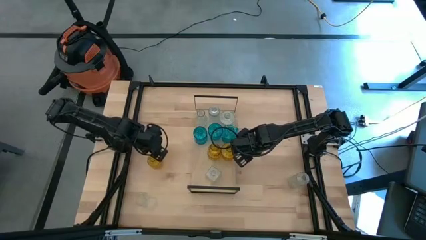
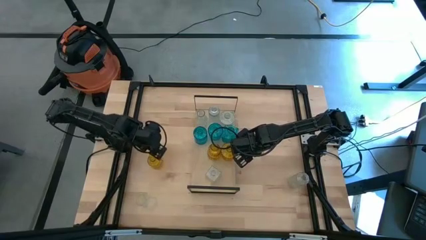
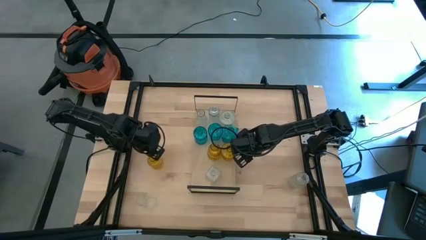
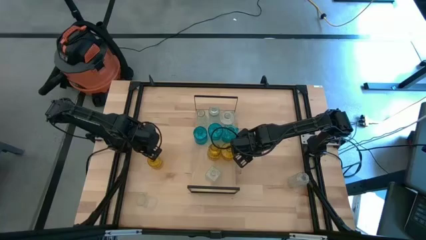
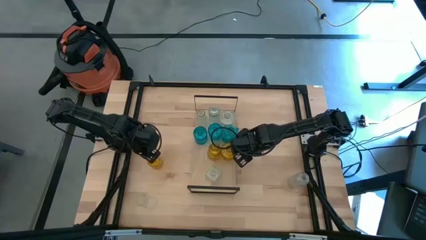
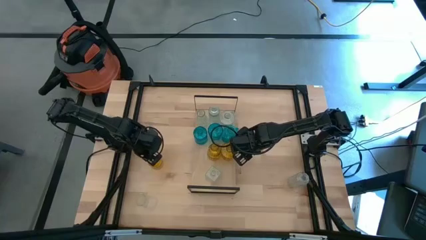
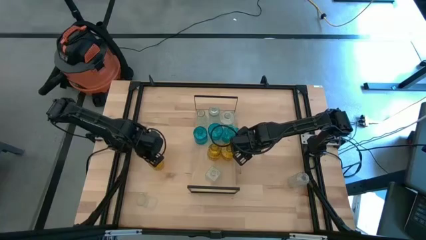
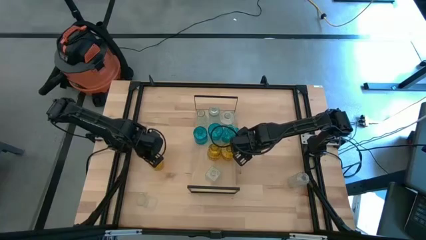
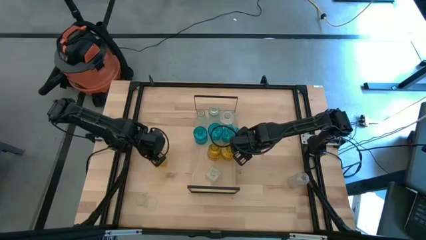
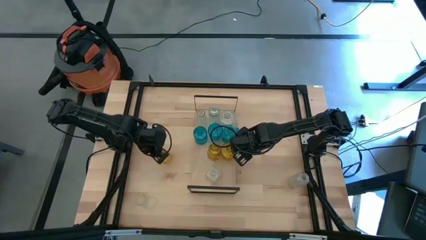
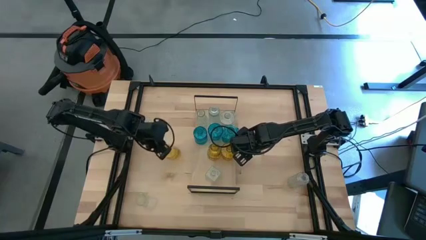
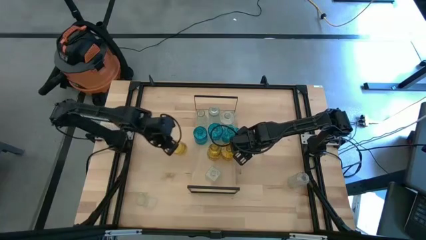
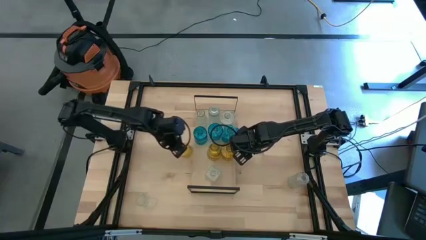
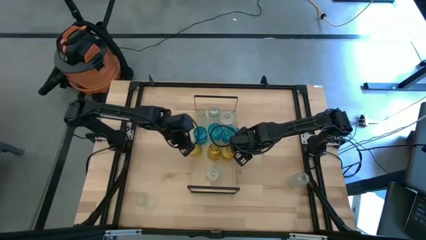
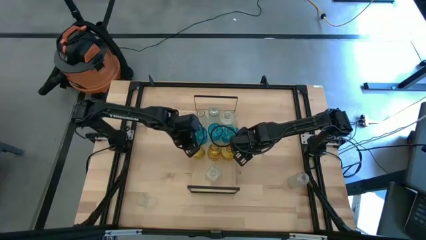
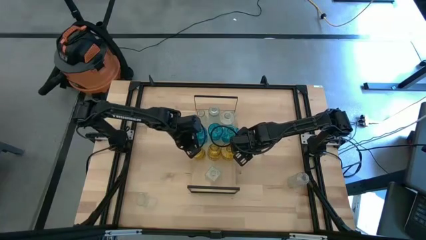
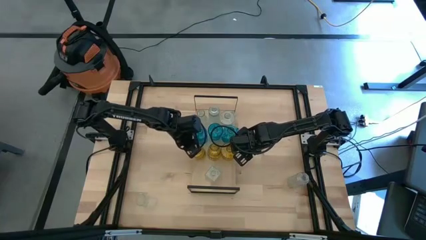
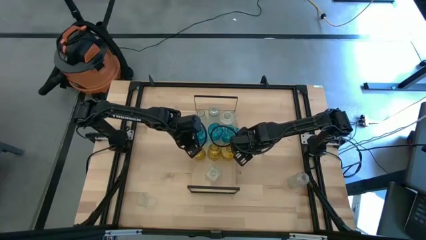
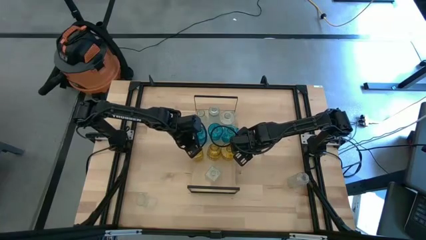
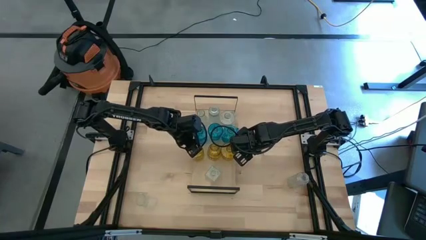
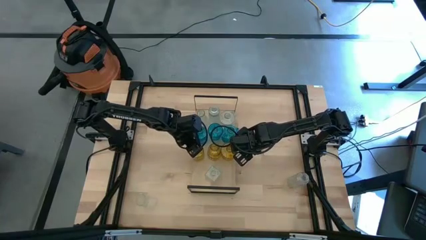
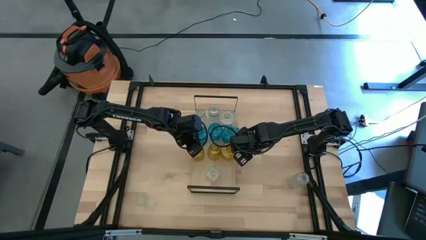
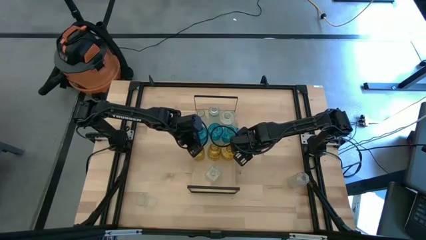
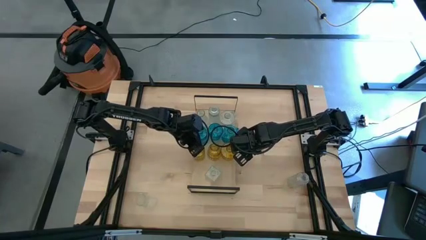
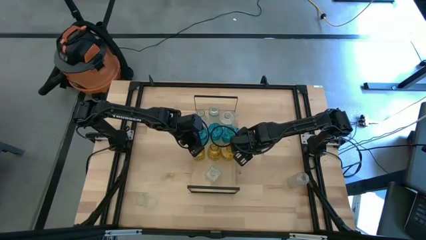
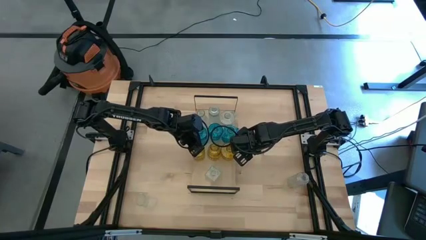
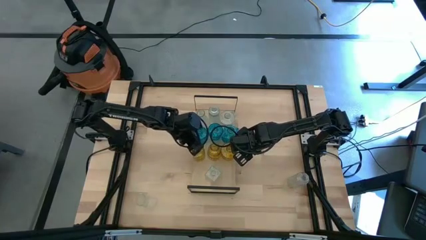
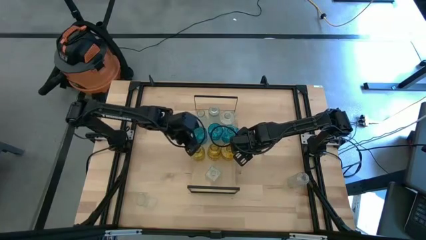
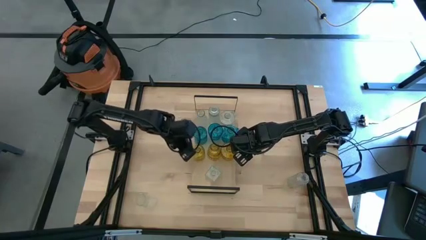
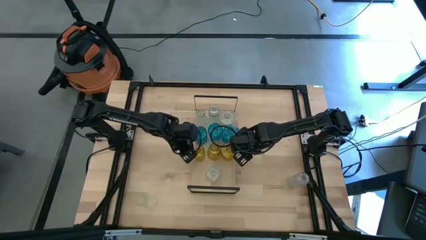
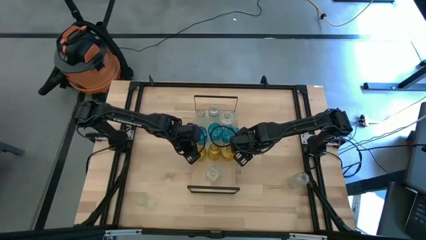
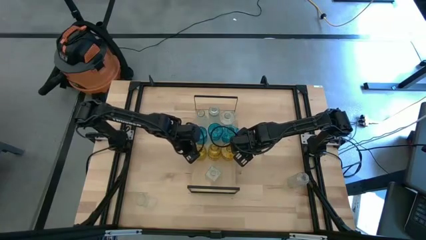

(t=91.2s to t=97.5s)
Task: sort vases onto shelf
Put the yellow vase on the shelf aligned with the other yellow vase

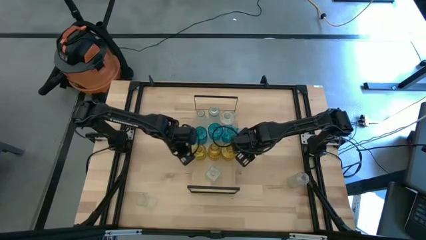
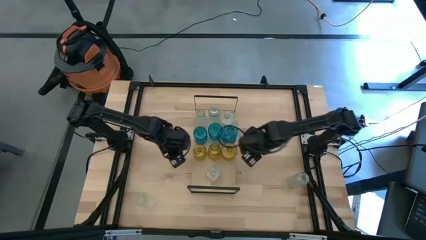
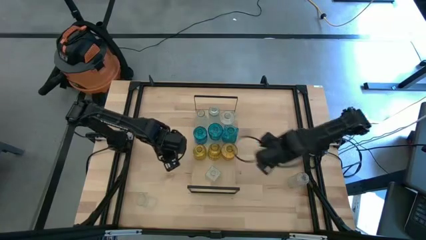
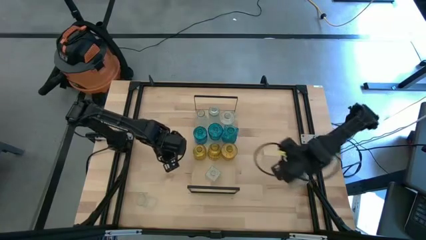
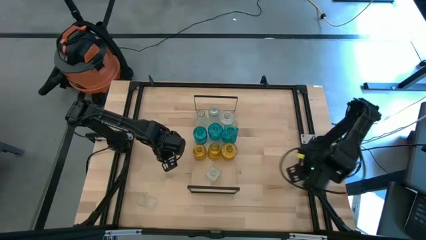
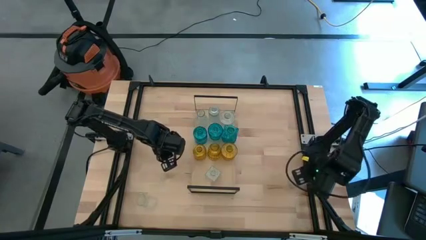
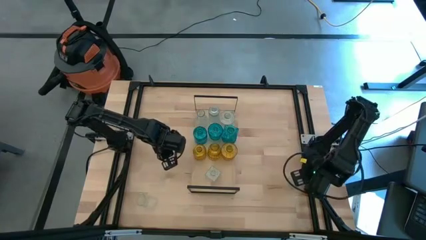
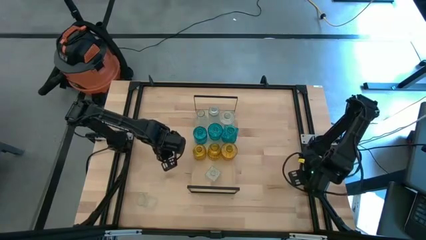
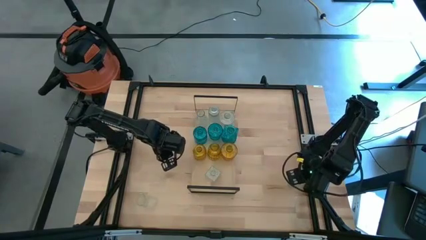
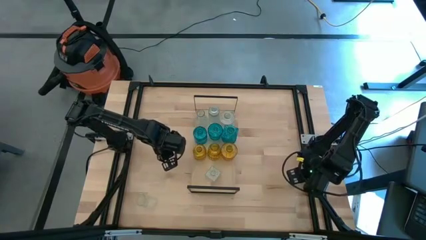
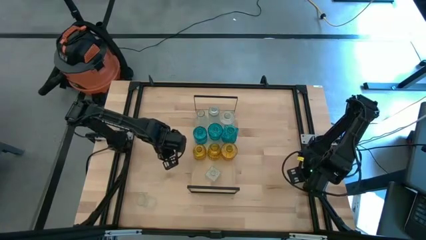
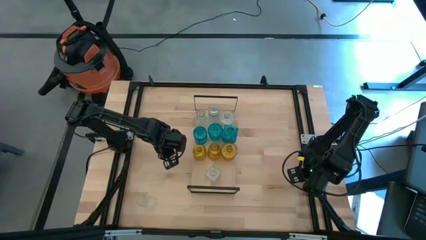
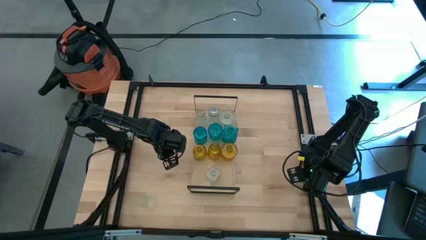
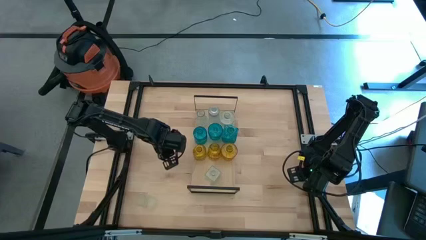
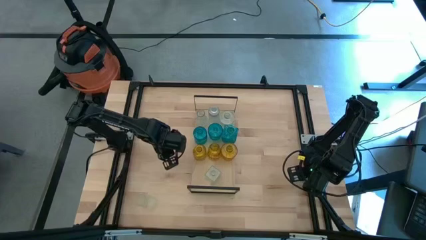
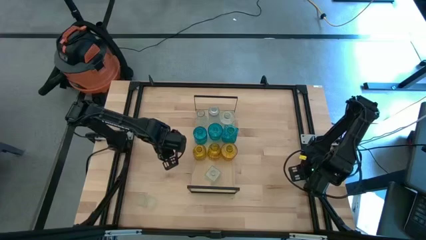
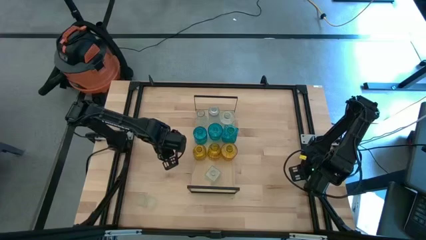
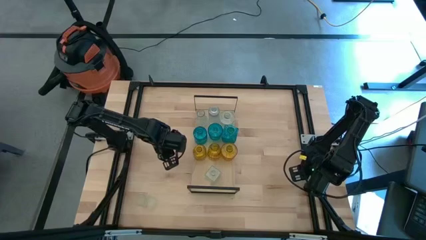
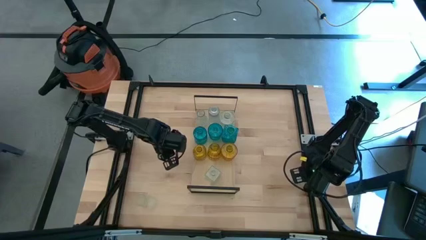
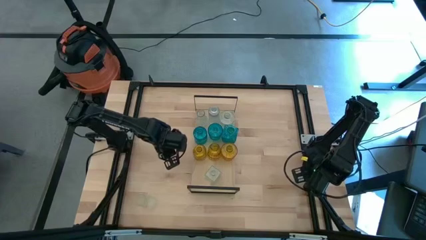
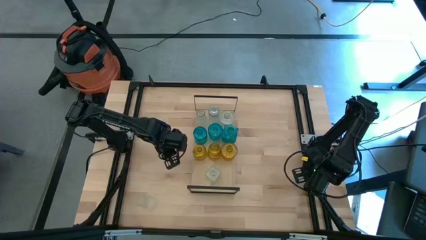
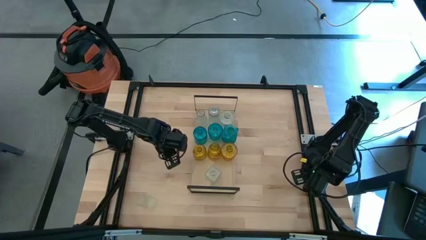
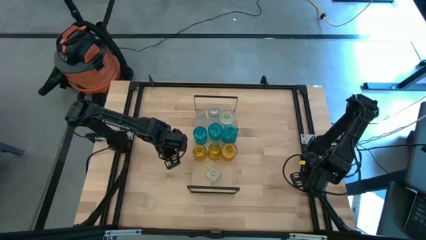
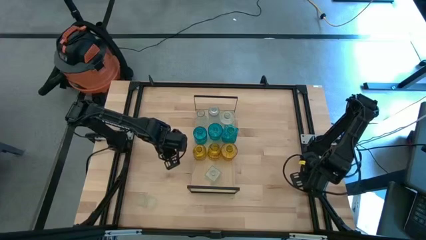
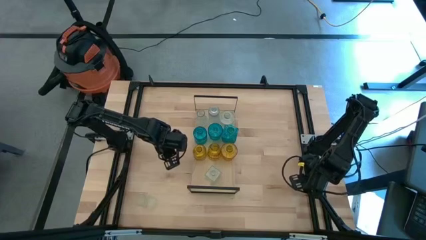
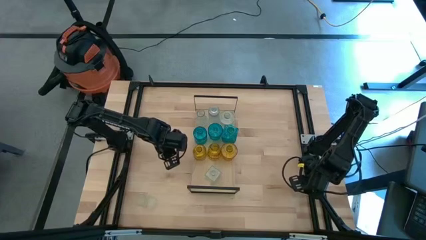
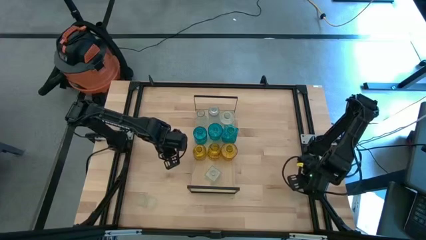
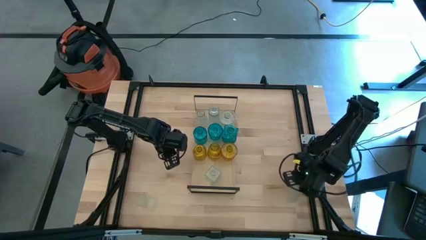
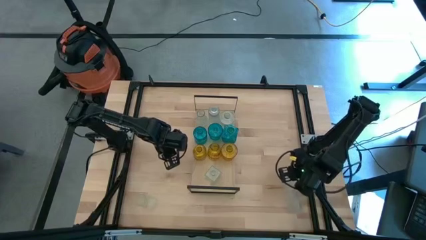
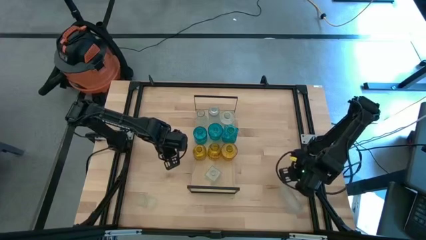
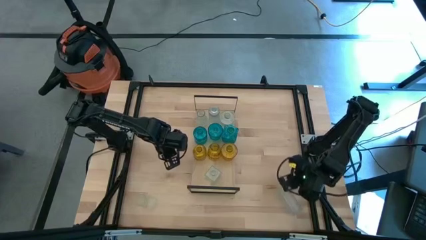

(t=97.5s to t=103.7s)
Put the transparent vase on the shelf aligned with the other bottom transparent vase

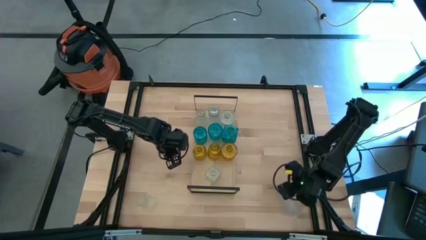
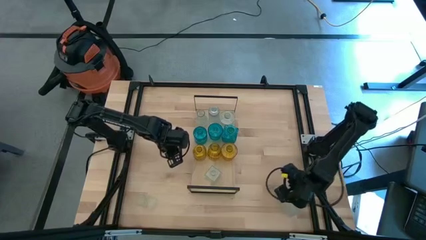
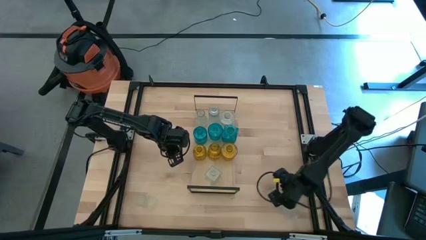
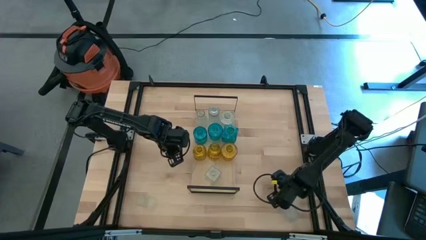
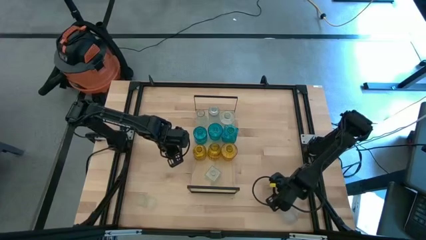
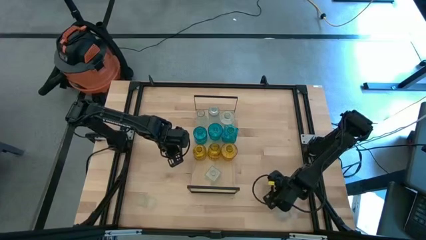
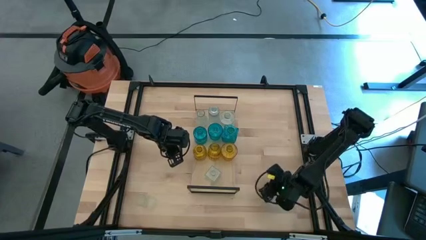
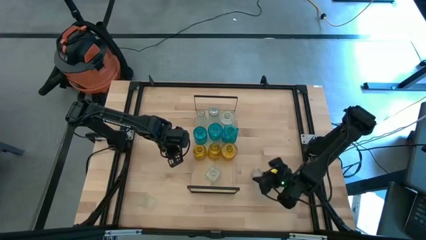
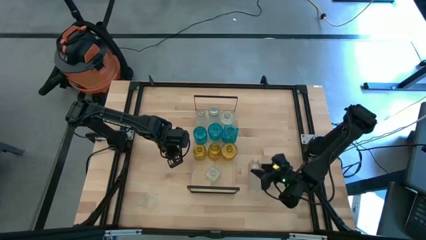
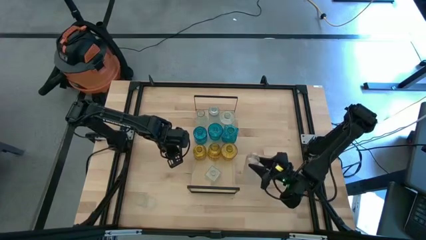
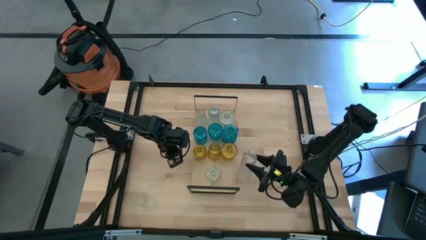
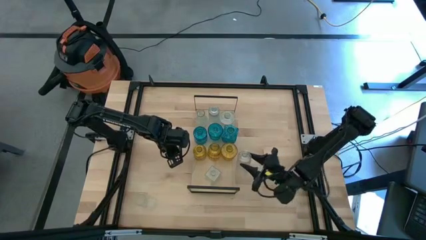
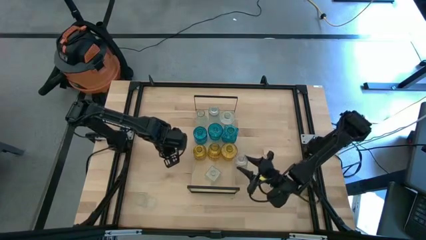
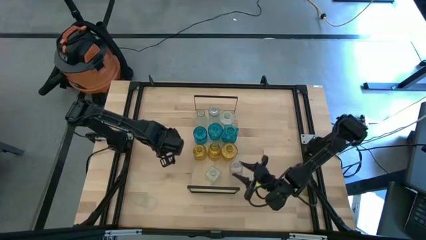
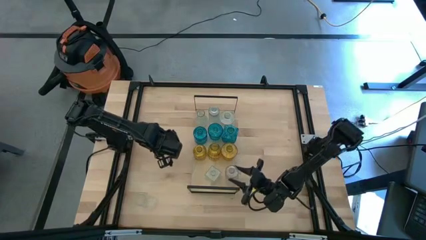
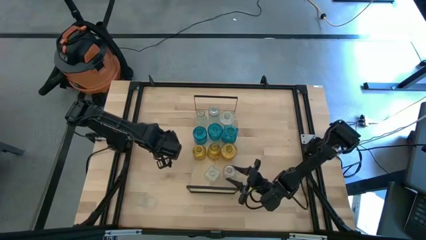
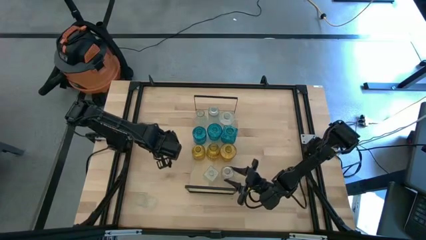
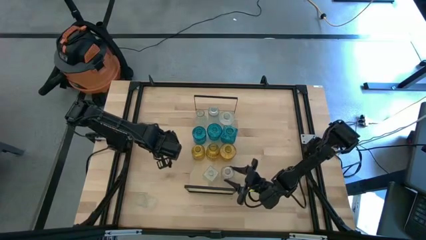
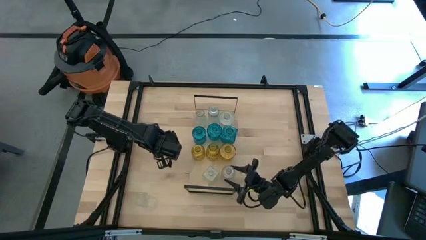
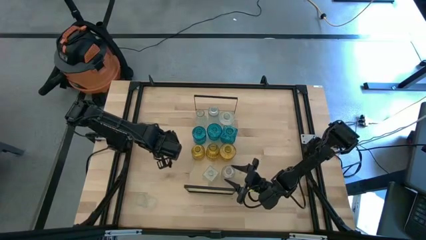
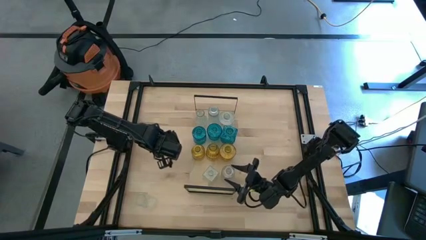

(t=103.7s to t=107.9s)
Put the transparent vase on the shelf aligned with the other bottom transparent vase

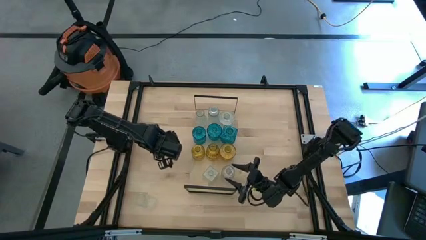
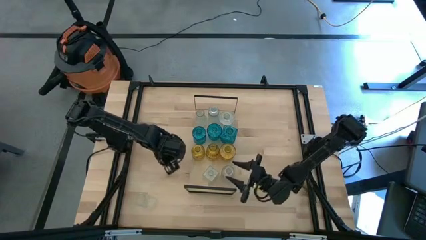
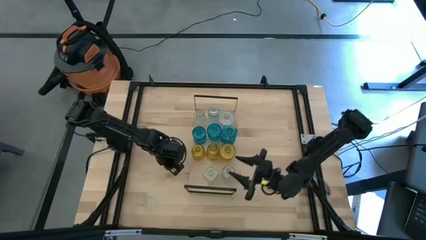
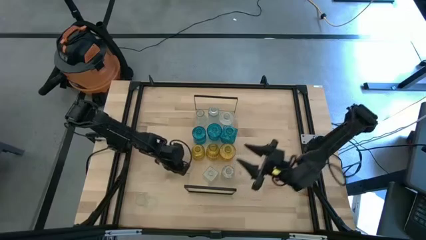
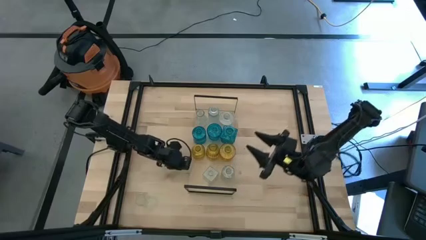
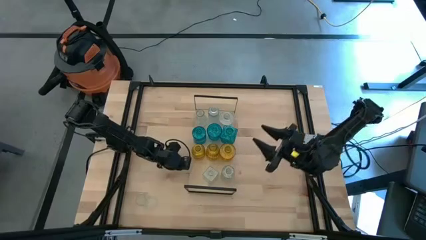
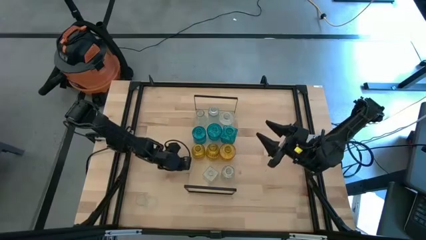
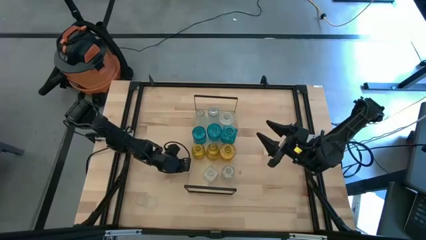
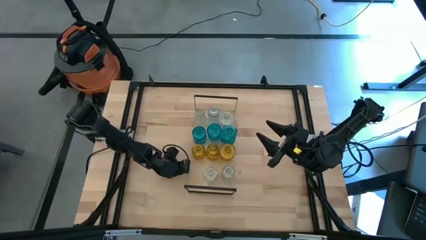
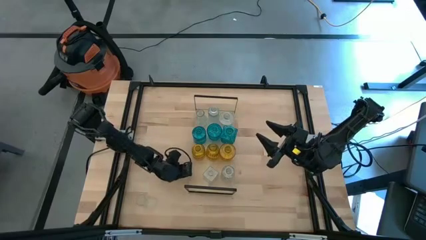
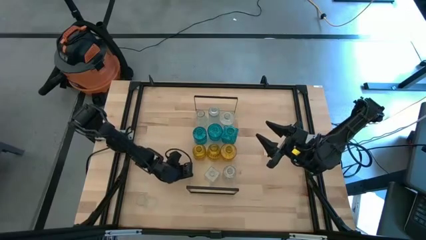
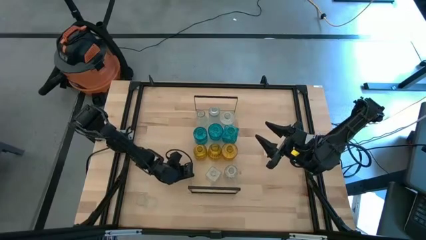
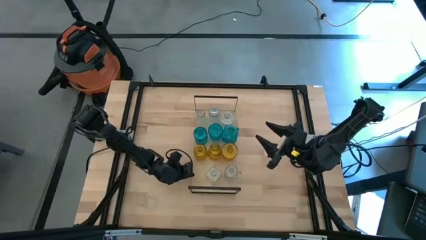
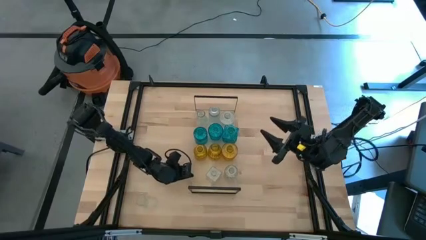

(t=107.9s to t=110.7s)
Adjust the shelf
